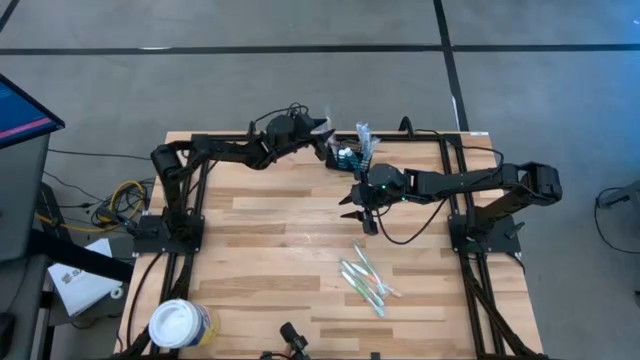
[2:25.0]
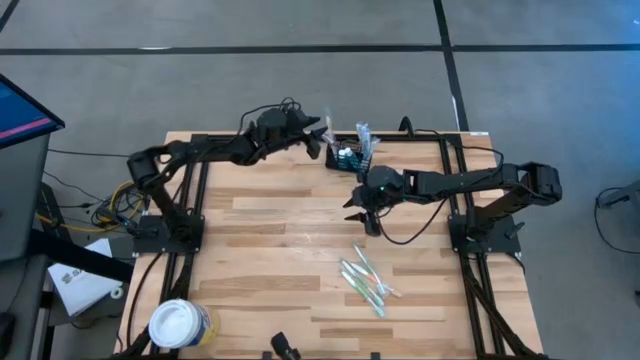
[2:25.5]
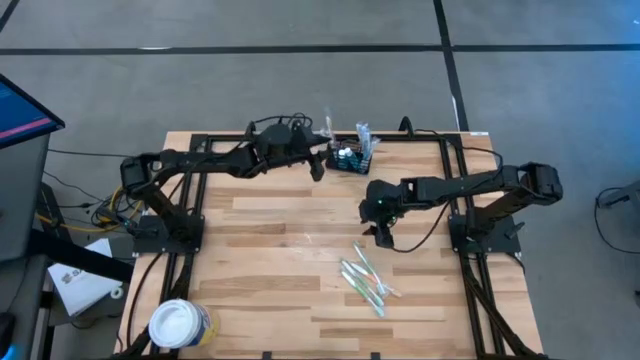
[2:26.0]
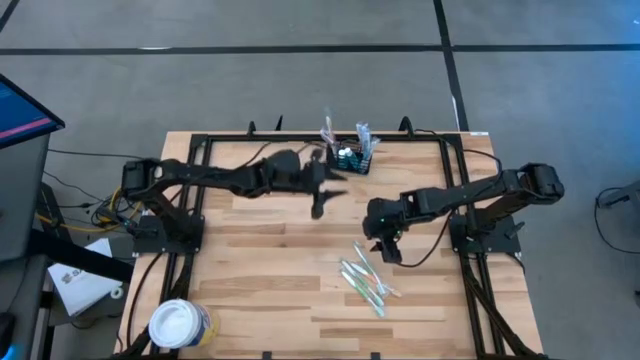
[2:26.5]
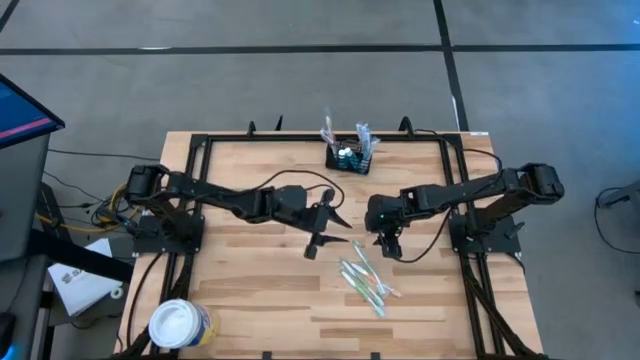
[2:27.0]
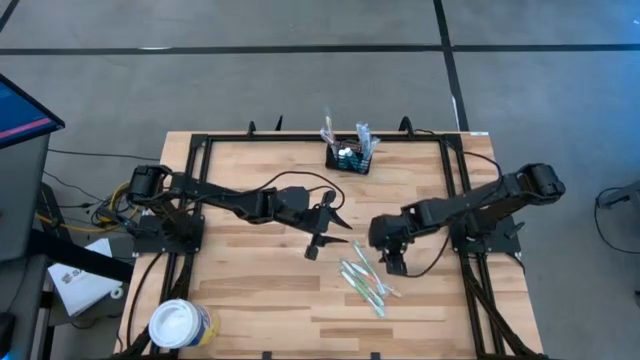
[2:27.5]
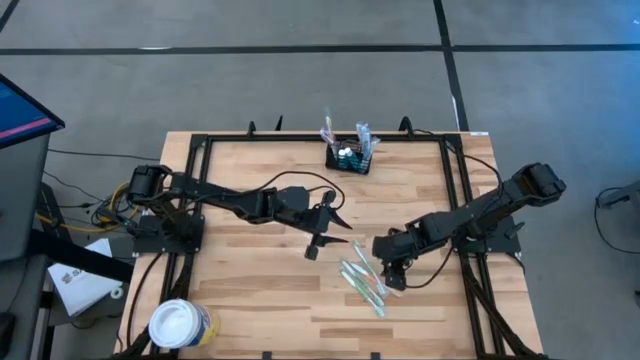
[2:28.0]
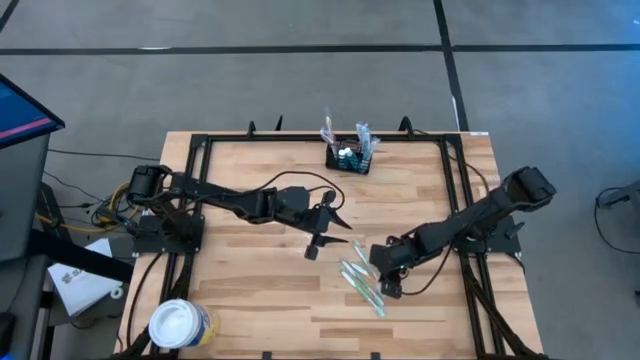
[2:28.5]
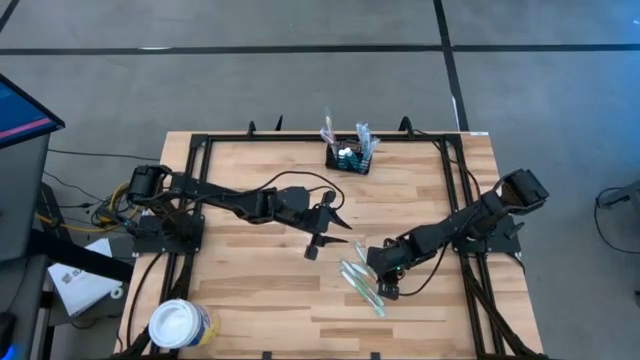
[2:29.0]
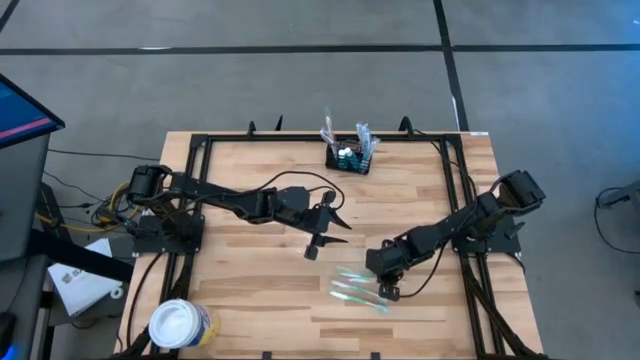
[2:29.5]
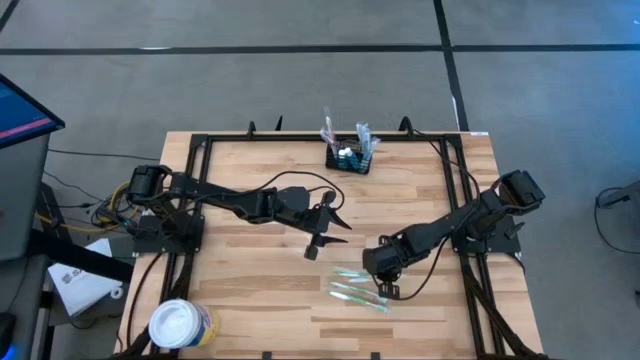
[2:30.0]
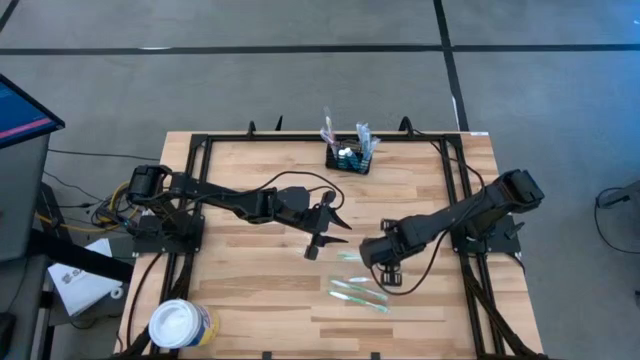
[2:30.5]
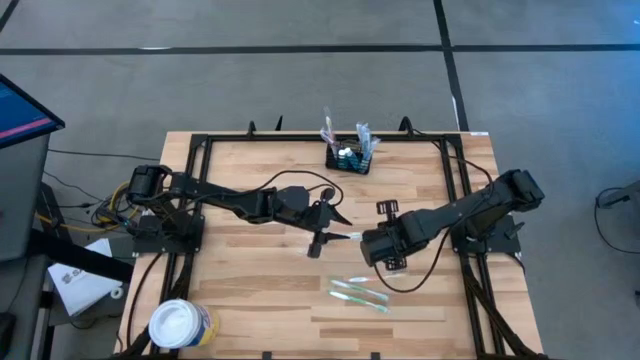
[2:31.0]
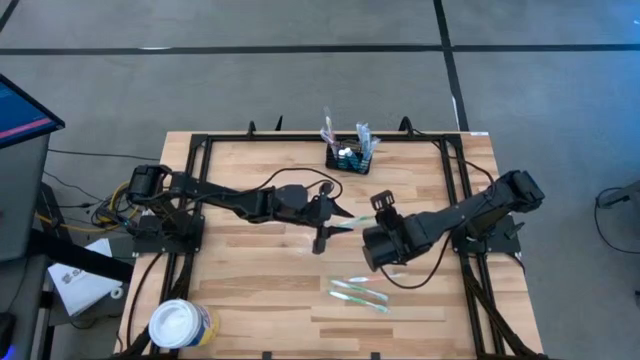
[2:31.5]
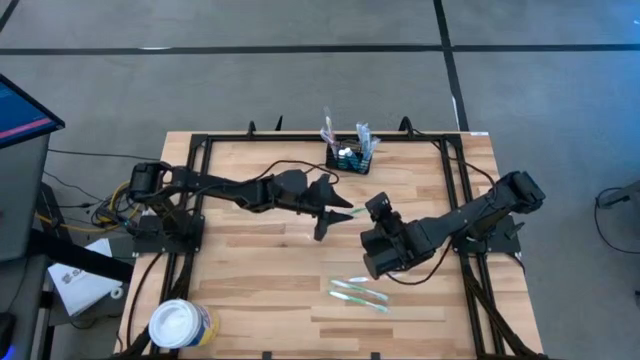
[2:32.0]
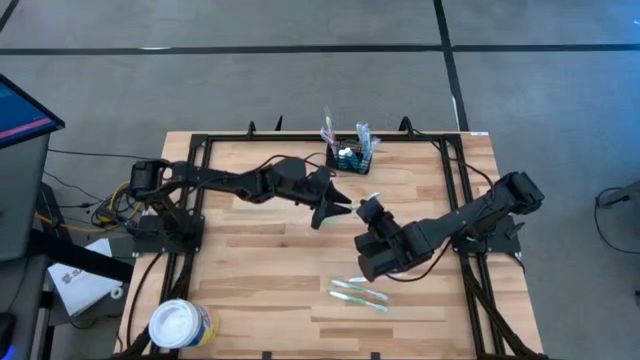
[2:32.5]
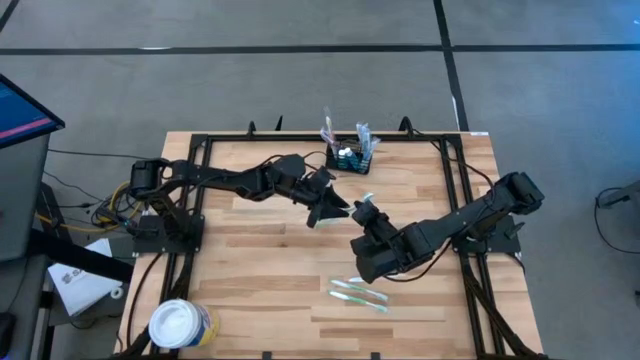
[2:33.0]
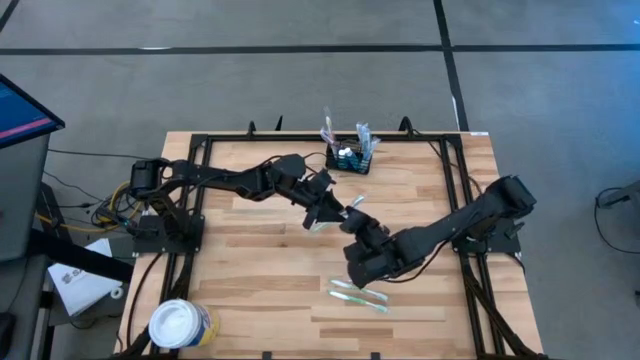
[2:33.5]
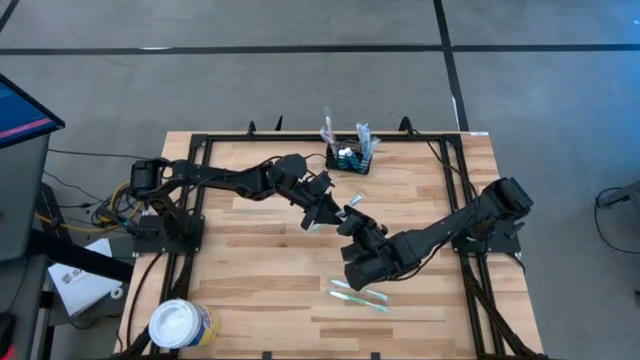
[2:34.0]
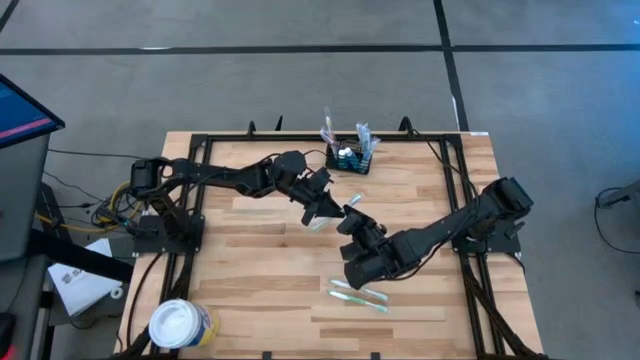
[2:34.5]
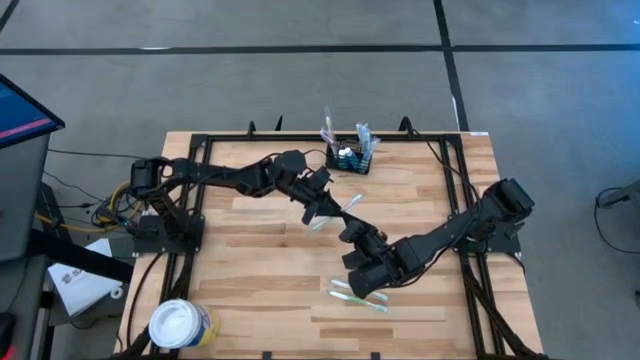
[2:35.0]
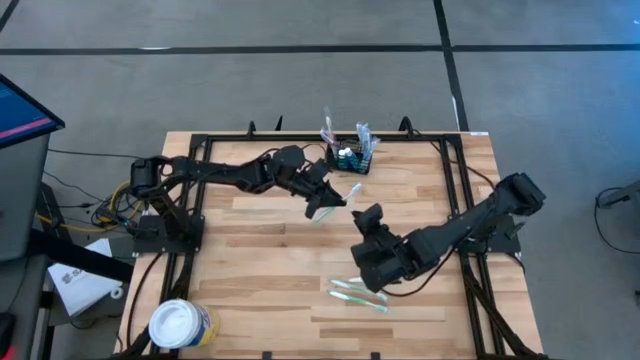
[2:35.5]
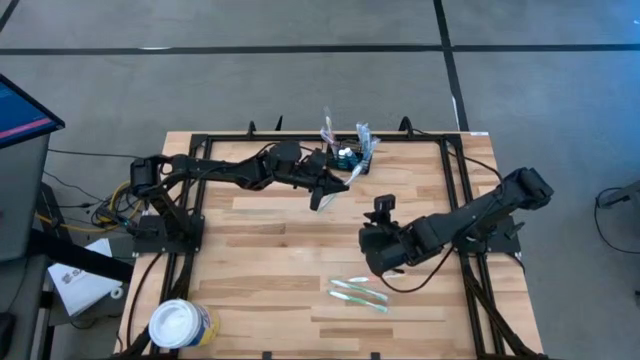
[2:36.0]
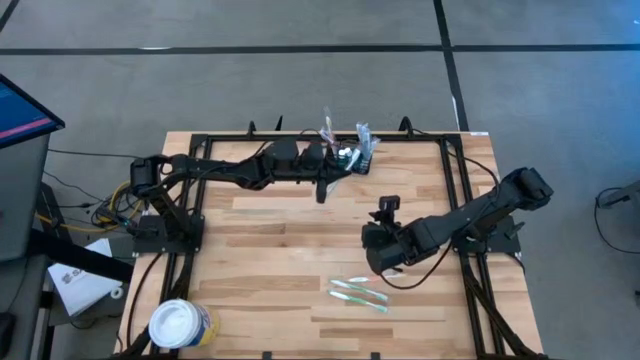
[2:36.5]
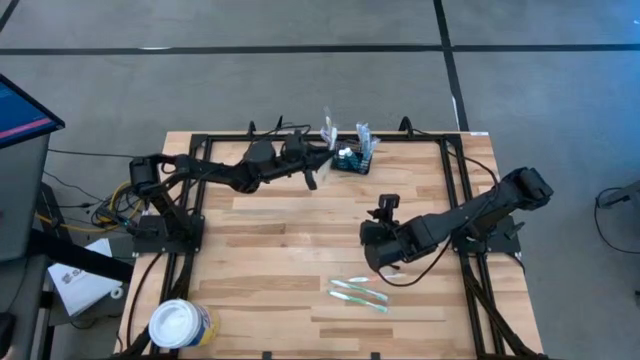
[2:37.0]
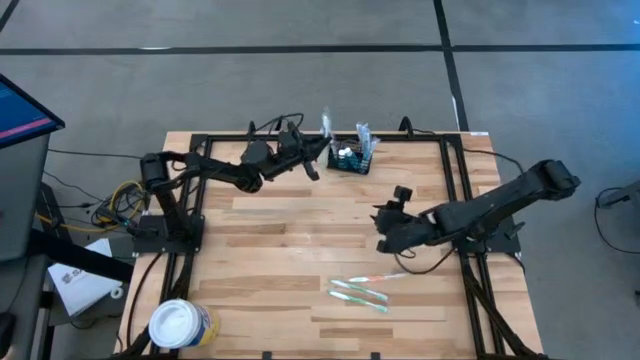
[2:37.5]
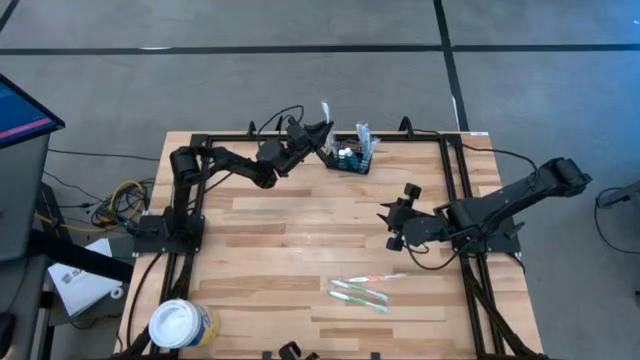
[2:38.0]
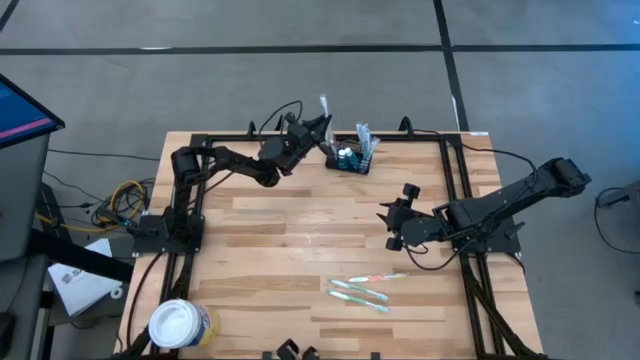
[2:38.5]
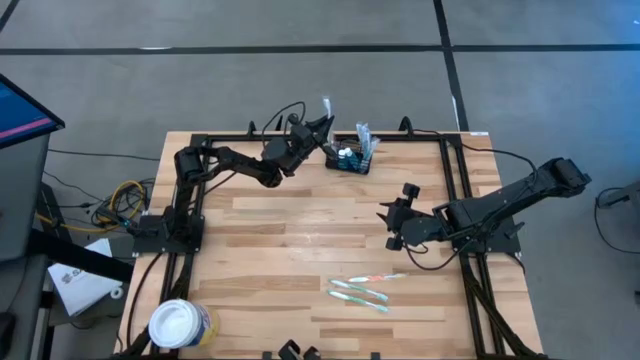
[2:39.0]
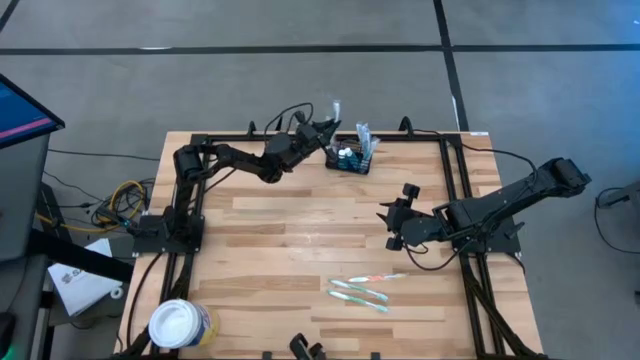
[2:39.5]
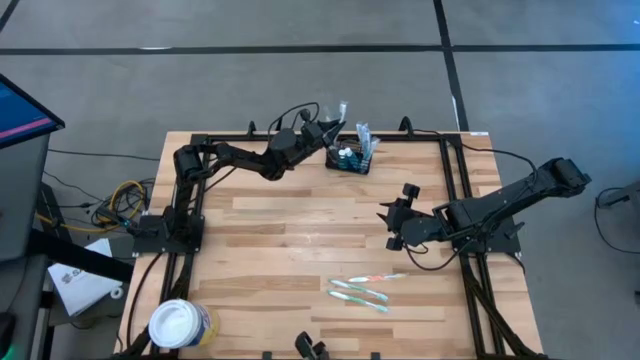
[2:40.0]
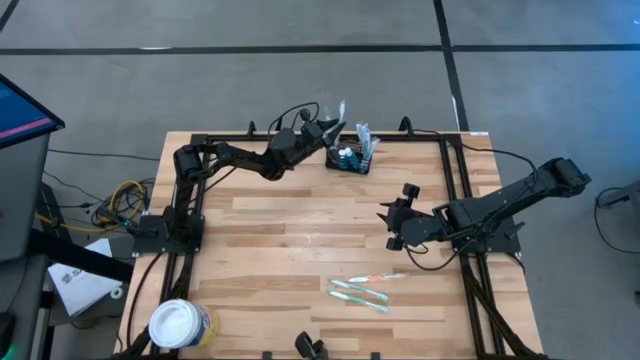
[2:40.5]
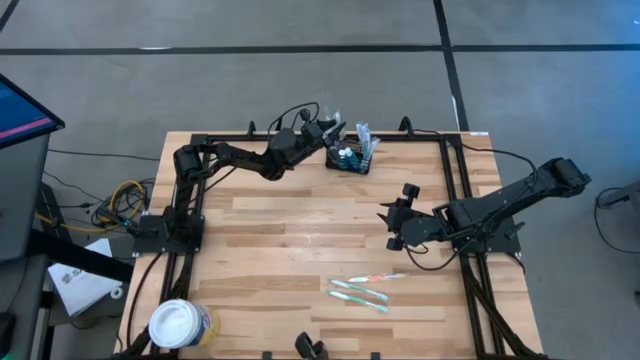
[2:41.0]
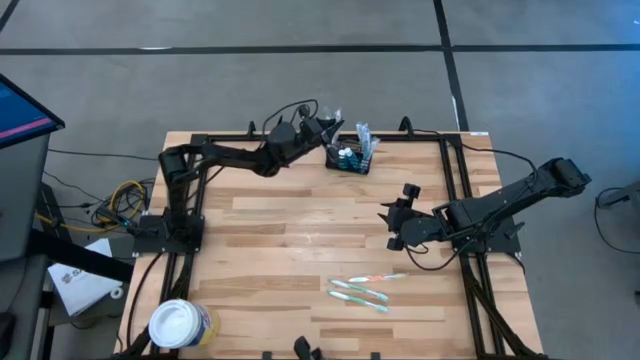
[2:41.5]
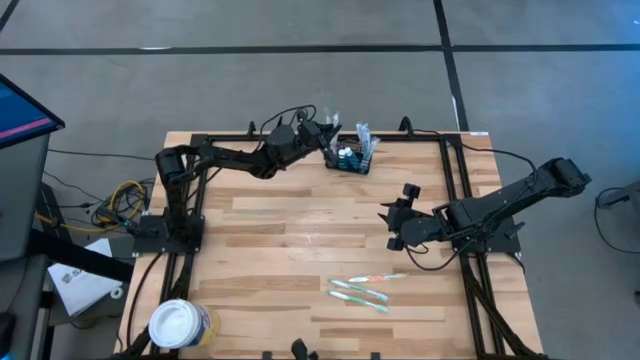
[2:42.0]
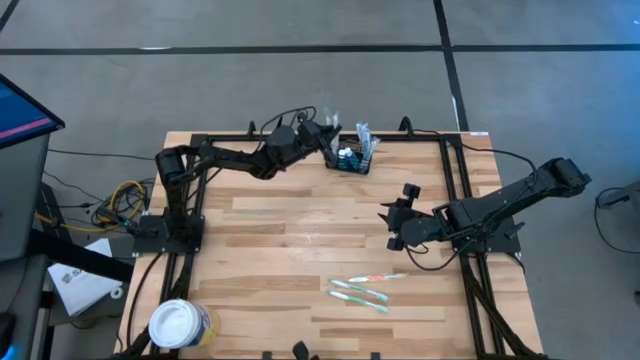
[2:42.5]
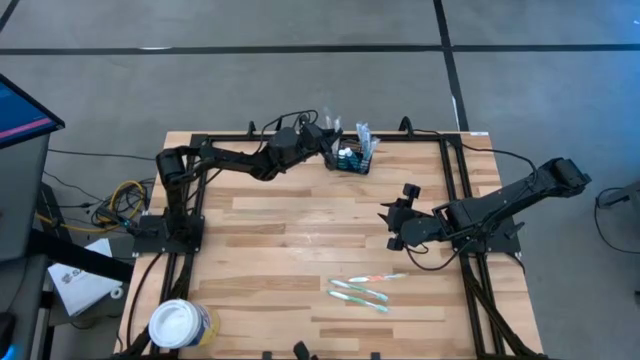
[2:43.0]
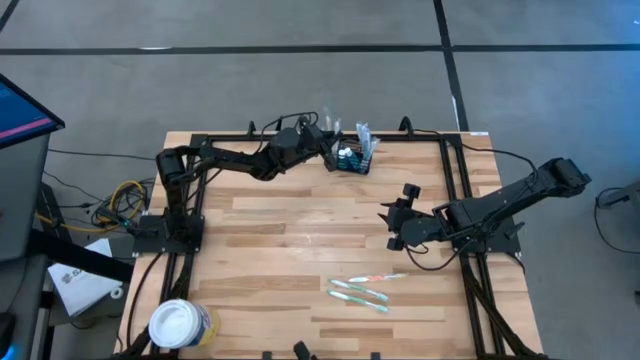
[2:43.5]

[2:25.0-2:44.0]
Task: Pick & Place toothbrushing station
Put the green toothbrush into the mesh organizer

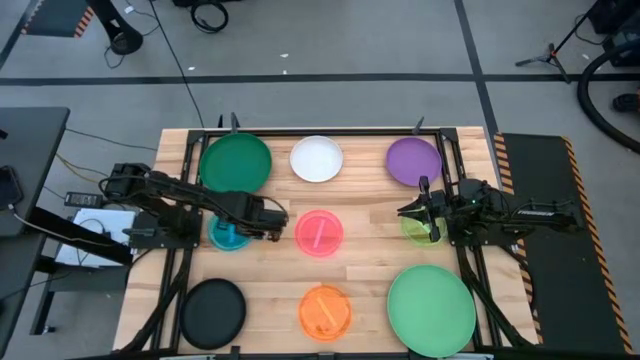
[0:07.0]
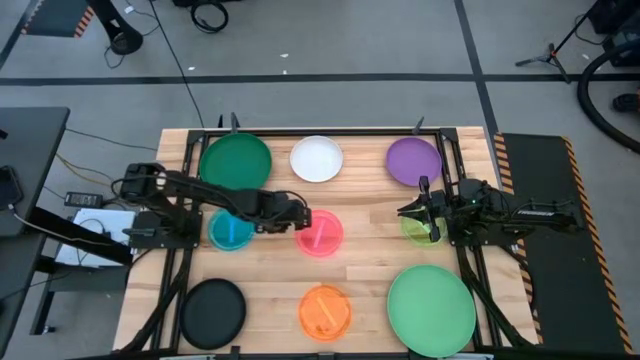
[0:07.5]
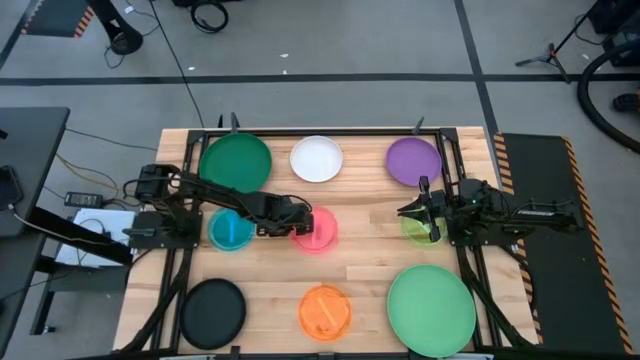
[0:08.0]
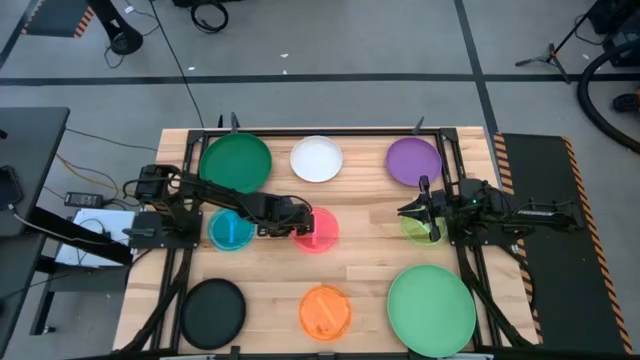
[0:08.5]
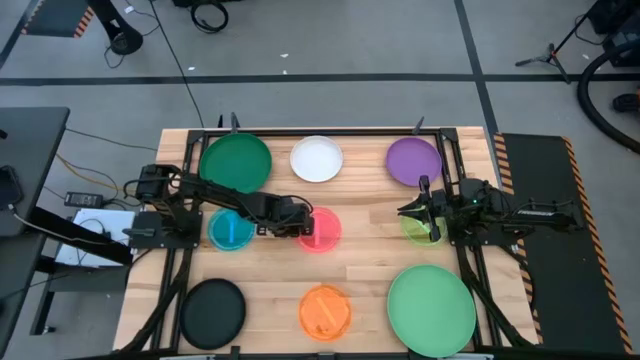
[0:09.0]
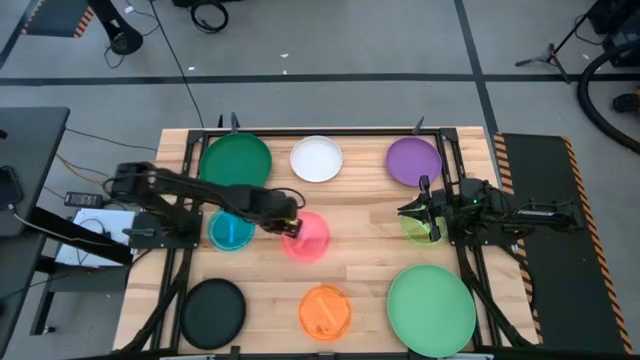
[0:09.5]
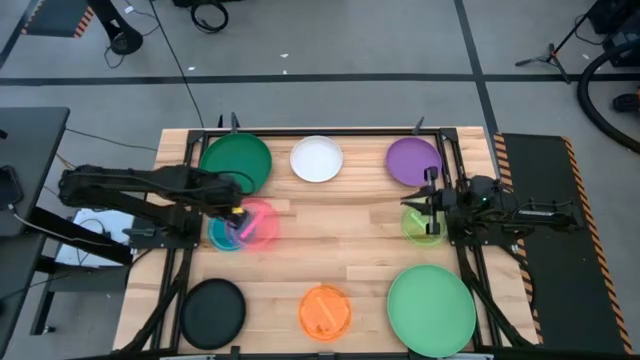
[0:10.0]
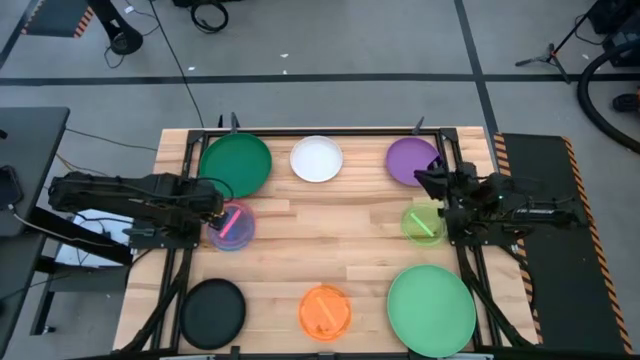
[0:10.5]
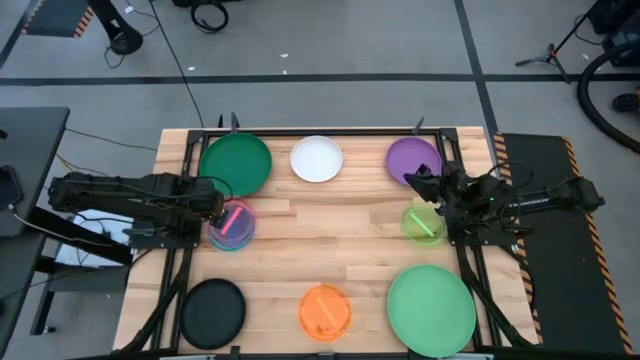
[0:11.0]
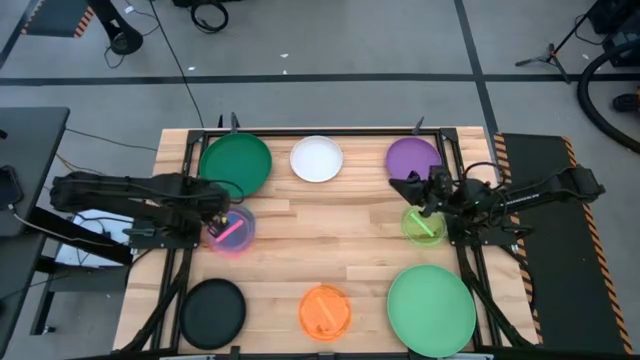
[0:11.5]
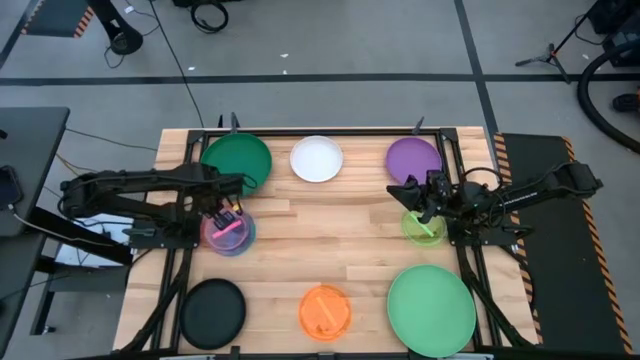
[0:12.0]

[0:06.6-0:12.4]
Task: Stack plastic plates
Stack the transparent red plate on top of the transparent blue plate
